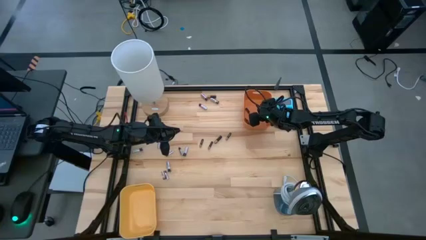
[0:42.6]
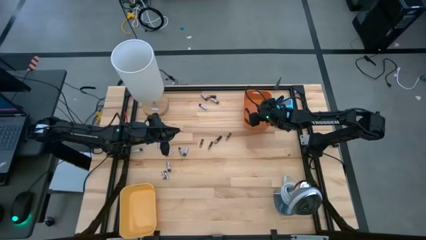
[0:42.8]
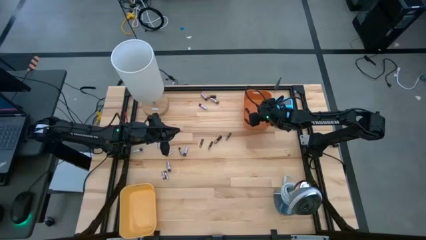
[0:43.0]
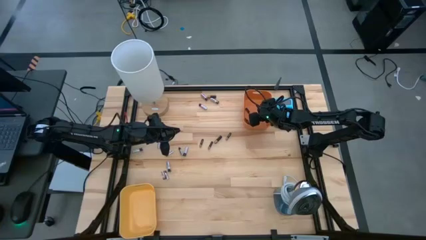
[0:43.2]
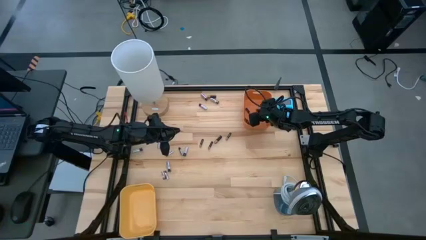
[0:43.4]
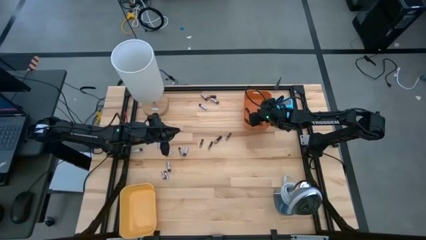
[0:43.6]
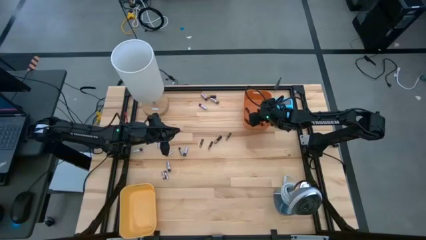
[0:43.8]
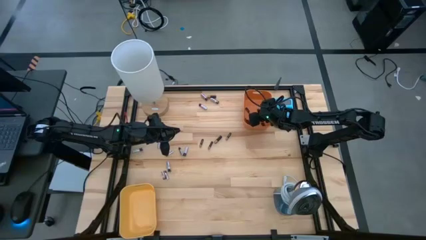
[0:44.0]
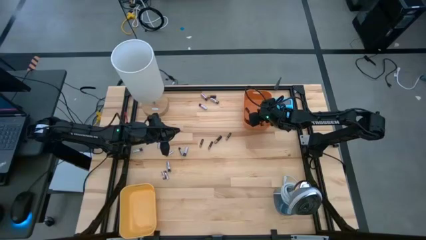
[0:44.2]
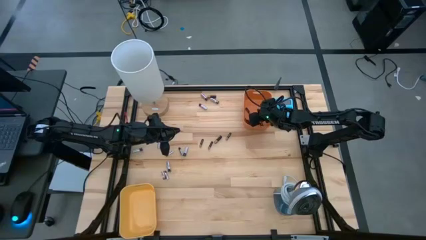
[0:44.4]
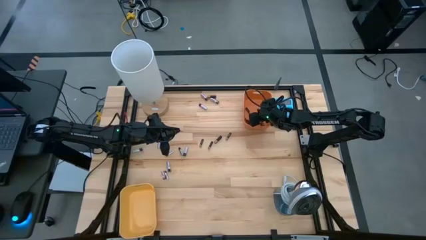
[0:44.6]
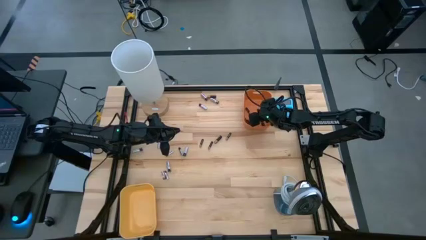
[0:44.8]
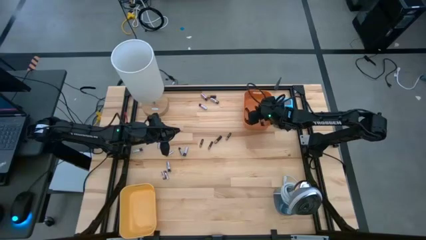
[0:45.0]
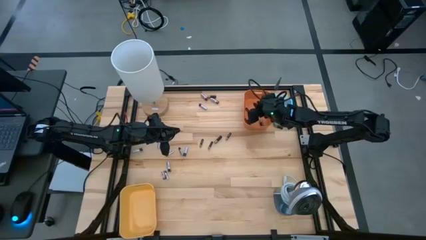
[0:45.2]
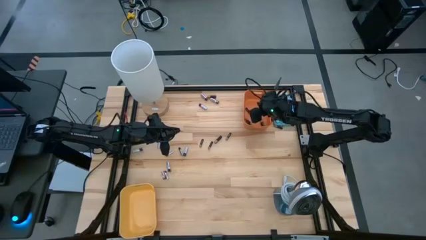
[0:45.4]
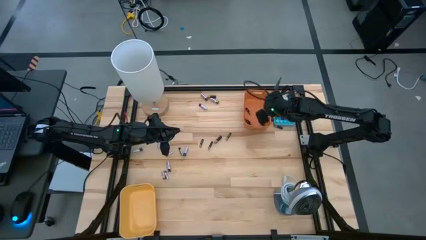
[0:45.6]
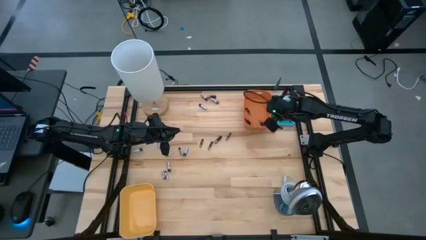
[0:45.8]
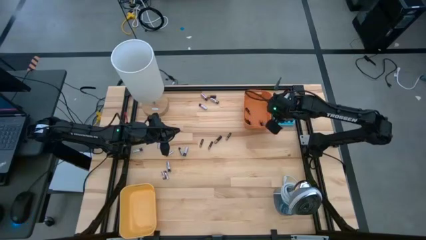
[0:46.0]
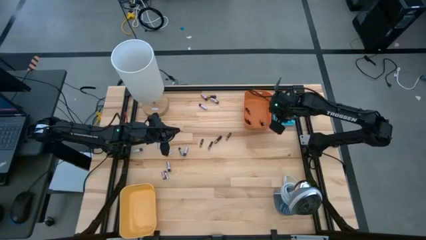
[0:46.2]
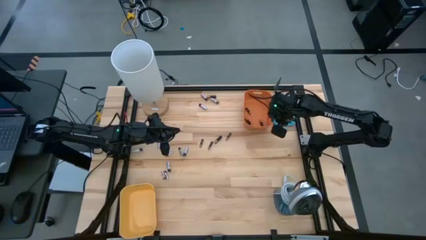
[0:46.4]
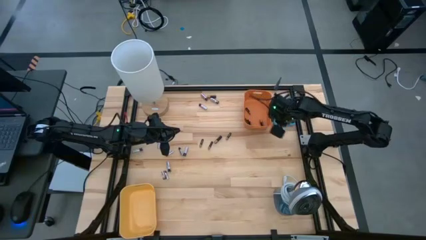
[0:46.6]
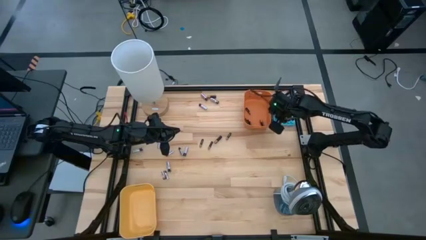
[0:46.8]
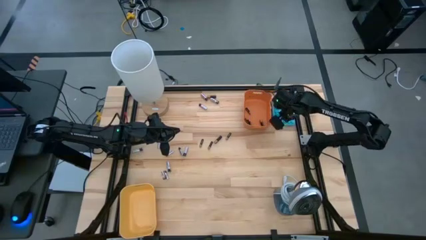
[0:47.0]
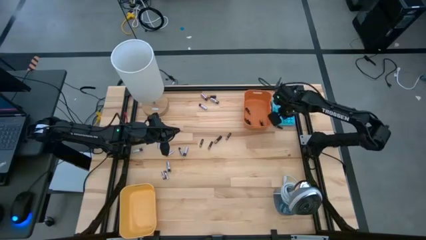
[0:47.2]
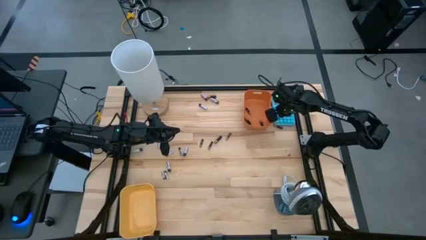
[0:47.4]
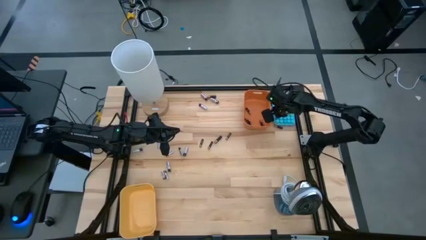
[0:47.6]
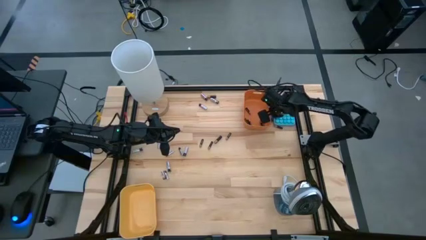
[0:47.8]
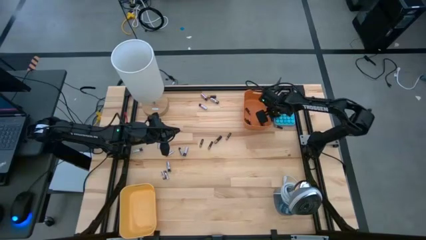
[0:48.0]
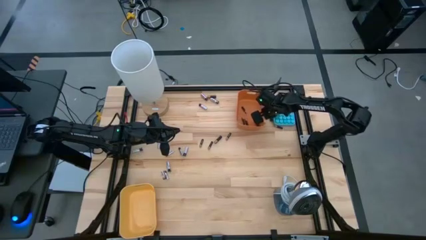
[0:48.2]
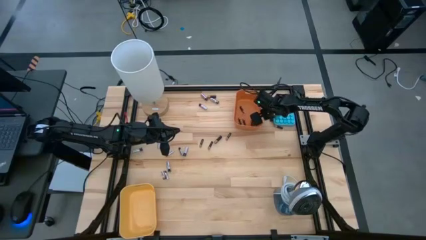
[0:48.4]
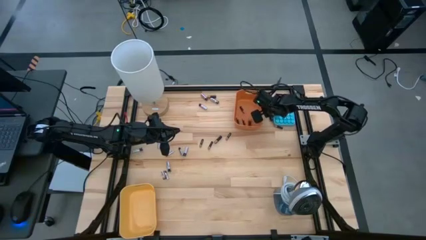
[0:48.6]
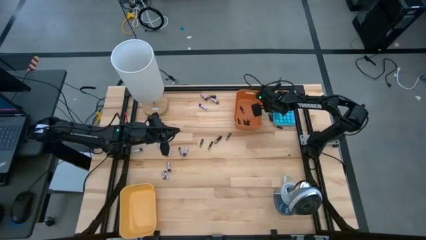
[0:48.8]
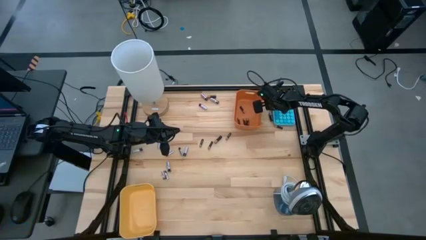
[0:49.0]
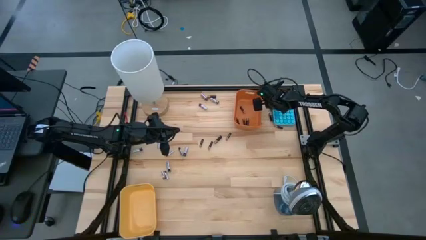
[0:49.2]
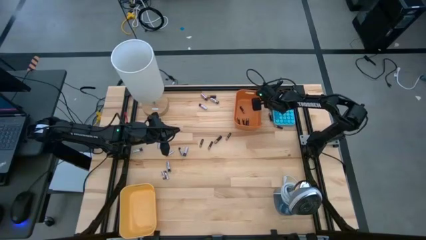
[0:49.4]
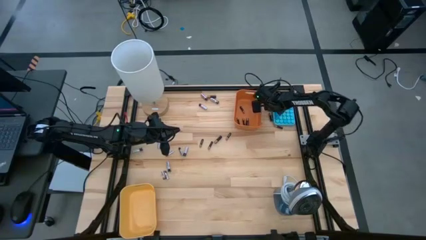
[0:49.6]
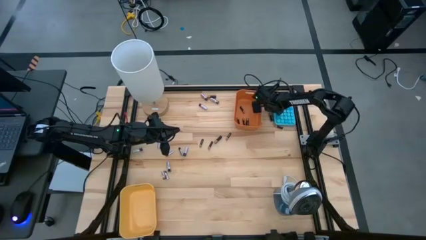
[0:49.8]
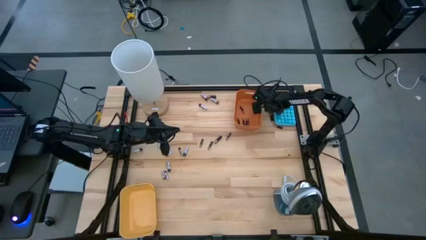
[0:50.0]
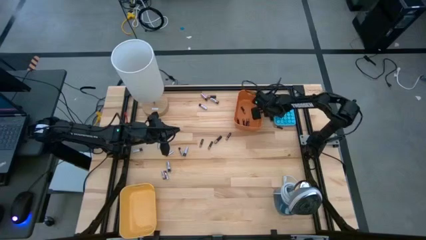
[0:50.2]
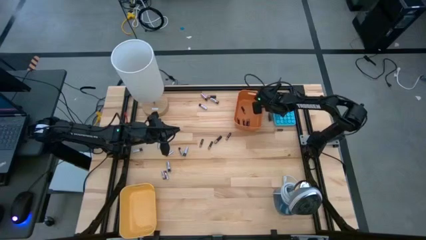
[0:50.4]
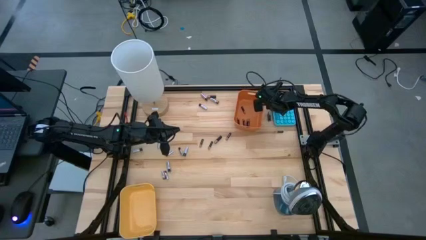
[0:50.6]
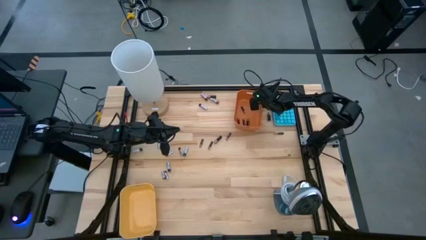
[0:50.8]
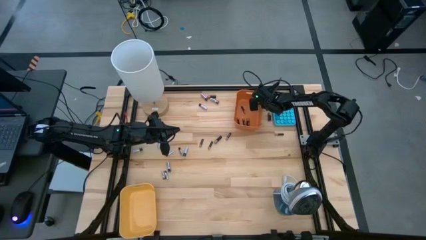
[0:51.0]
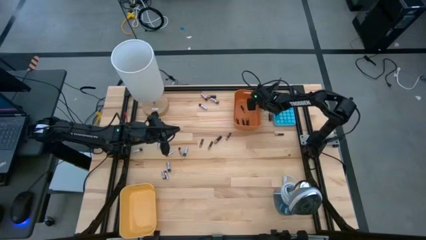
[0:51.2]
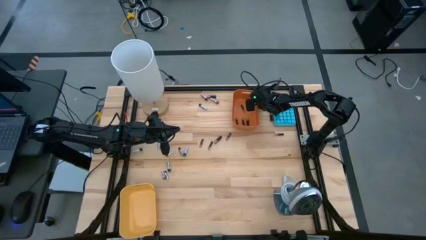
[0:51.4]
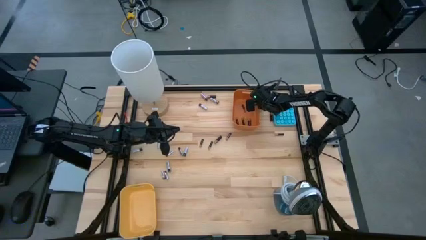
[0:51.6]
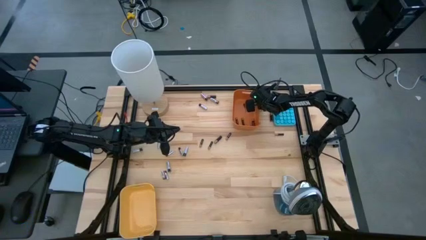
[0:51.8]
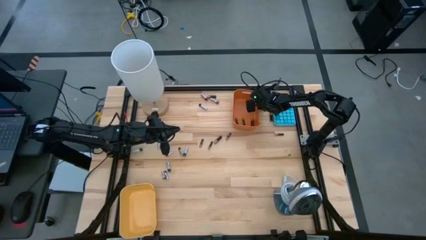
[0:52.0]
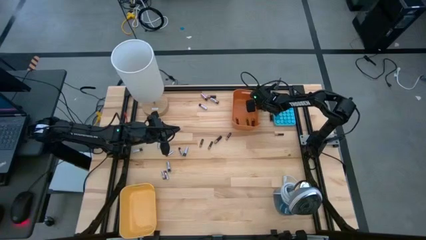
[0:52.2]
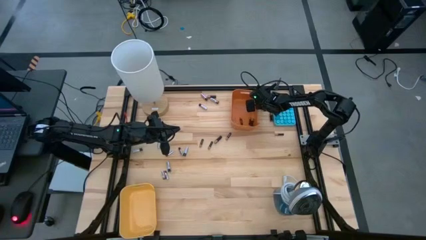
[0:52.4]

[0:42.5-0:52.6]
Task: Sort batteries
Put the black battery into the orange bin

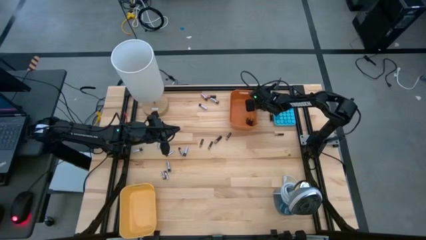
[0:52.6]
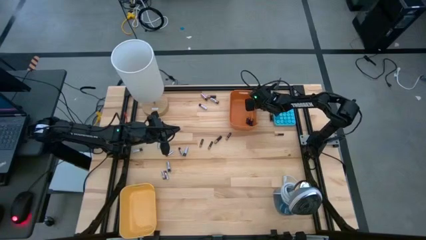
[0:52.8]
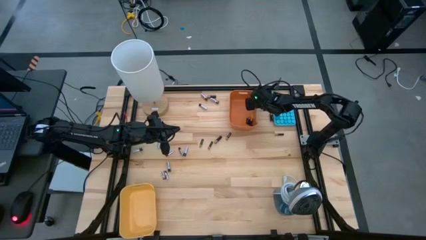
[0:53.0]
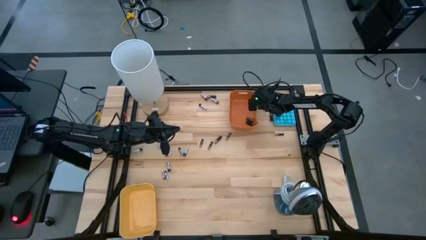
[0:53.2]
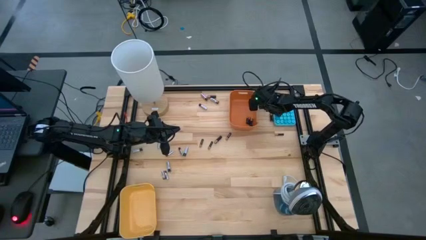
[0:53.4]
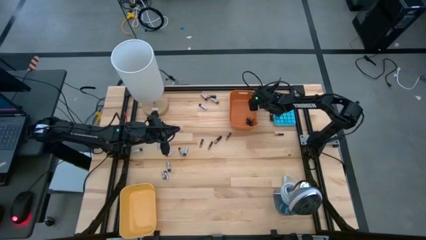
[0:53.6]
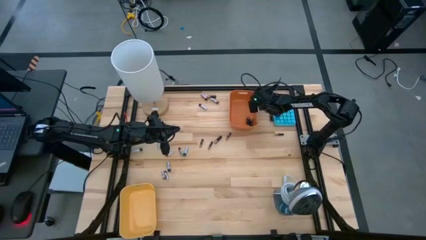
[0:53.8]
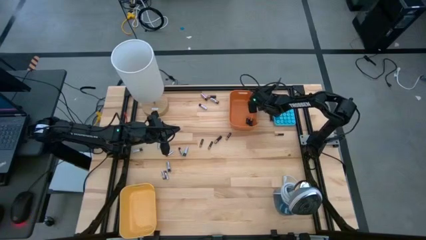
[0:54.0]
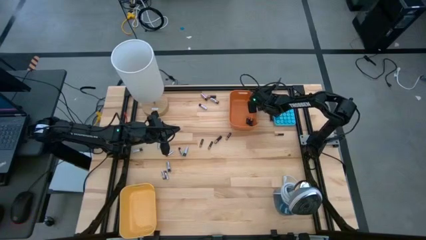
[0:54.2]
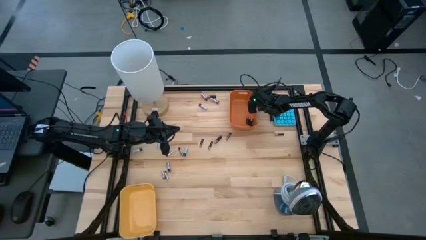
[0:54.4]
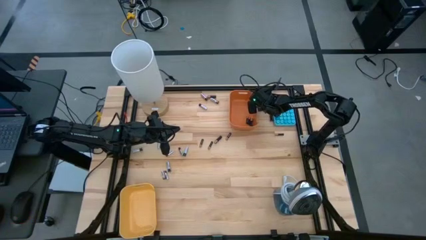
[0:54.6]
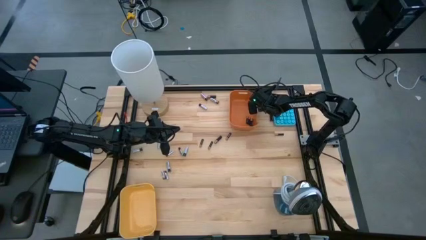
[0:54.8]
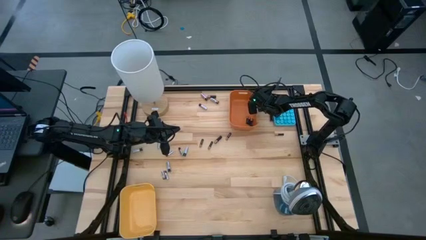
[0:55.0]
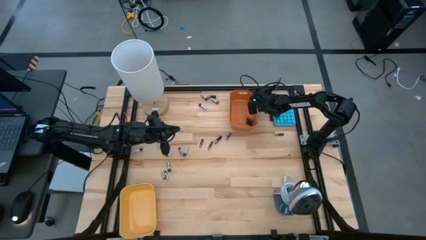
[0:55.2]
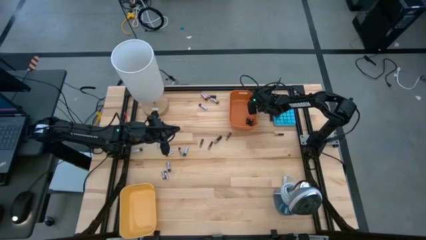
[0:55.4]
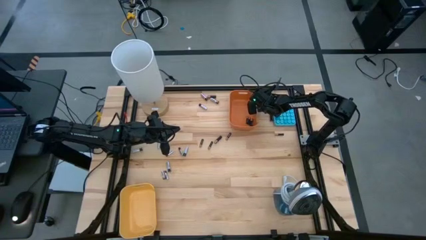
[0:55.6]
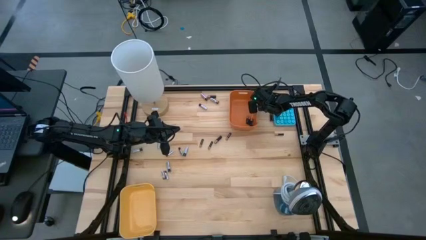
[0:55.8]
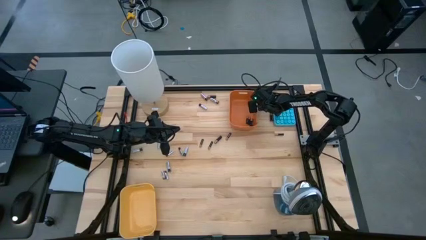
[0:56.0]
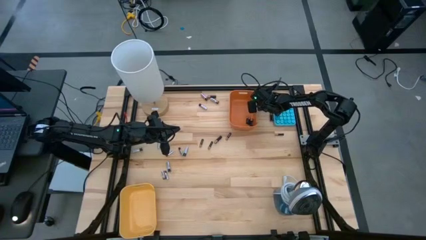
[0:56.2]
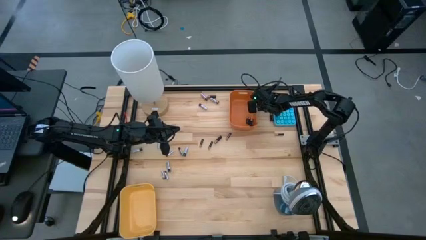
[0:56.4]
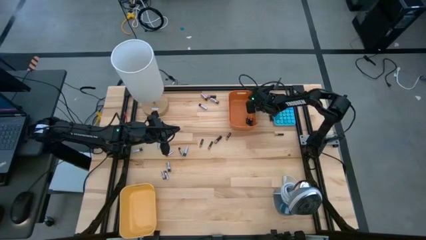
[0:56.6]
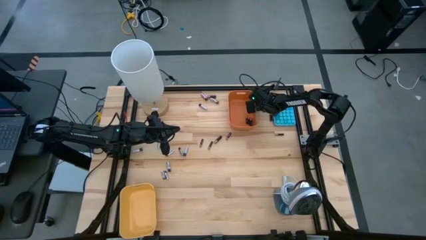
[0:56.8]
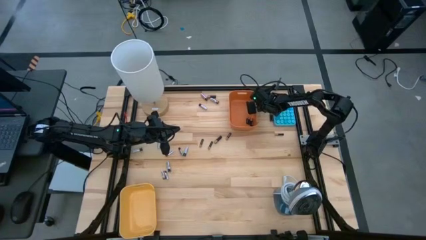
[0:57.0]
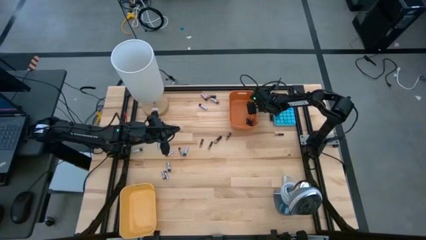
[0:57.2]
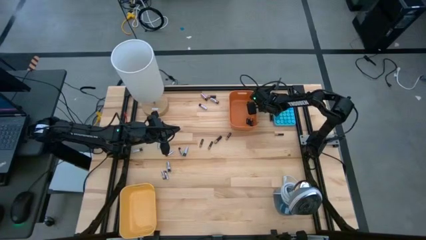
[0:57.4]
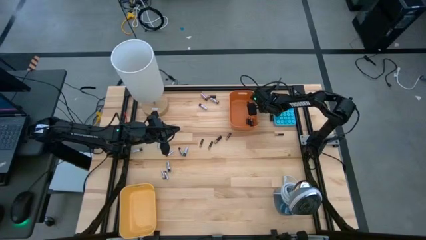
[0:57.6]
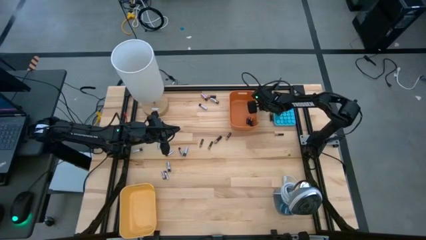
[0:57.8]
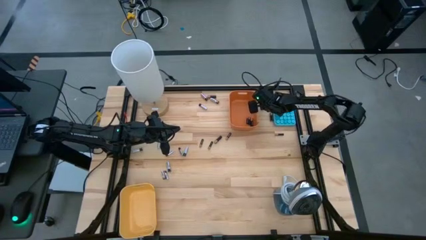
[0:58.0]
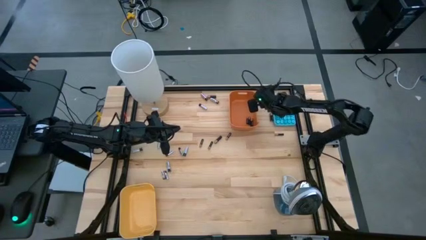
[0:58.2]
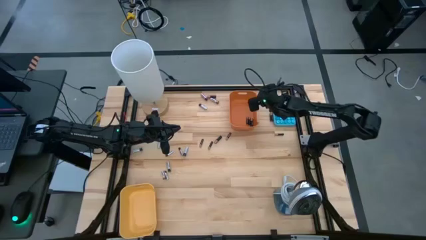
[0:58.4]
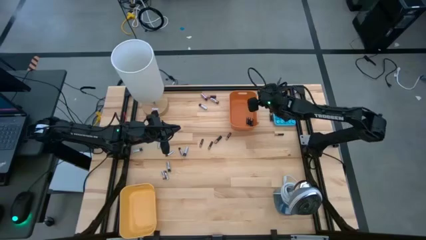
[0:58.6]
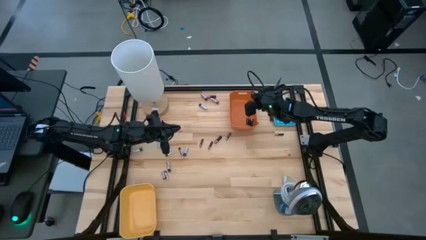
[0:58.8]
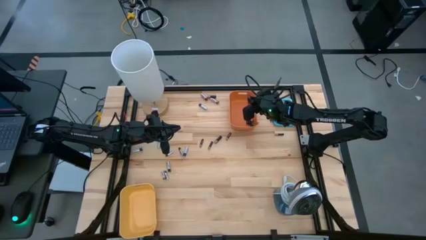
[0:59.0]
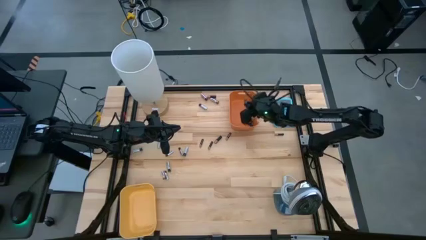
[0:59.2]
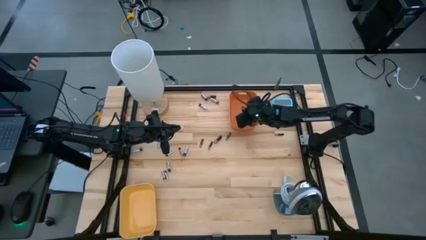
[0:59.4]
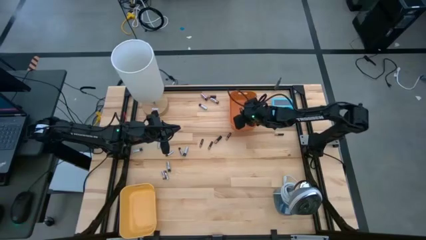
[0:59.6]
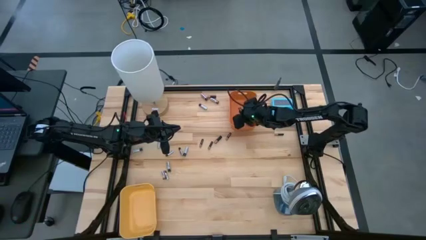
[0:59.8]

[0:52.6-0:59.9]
Put the black battery into the orange bin
